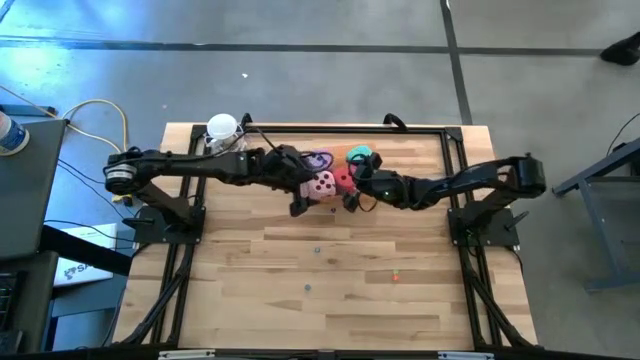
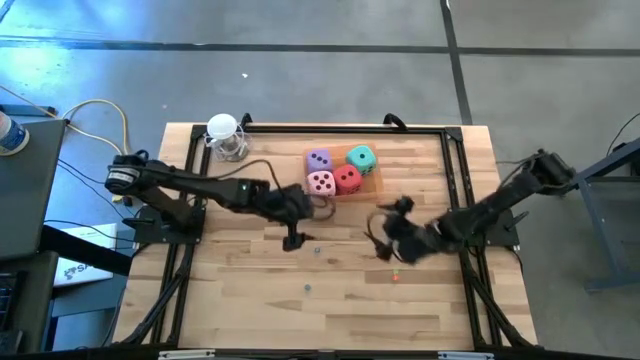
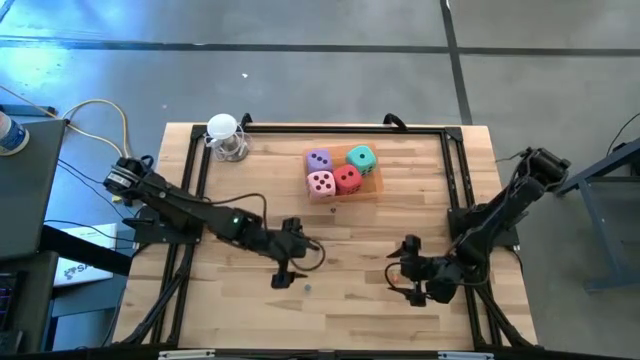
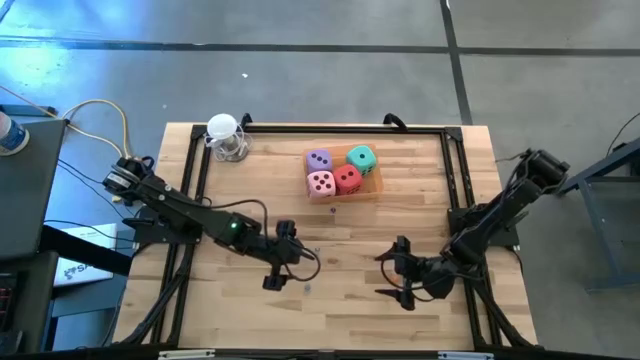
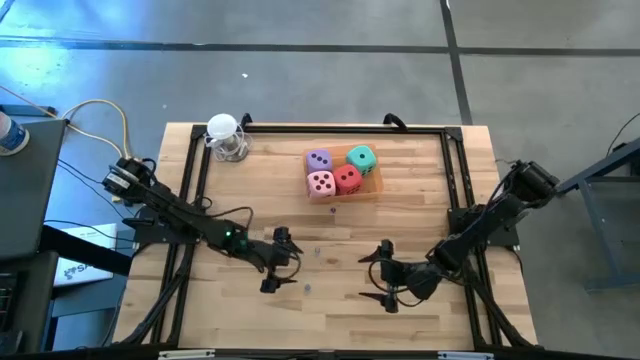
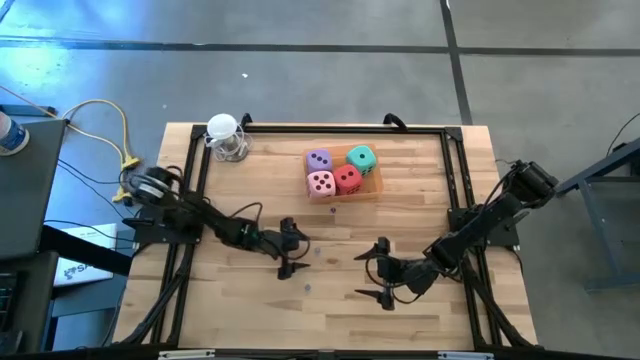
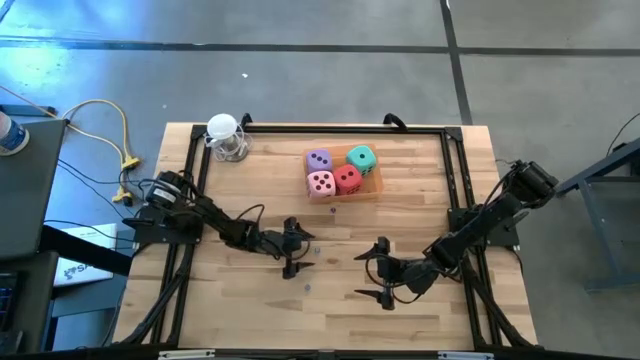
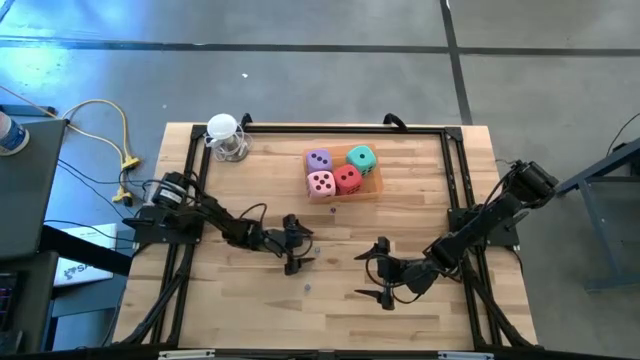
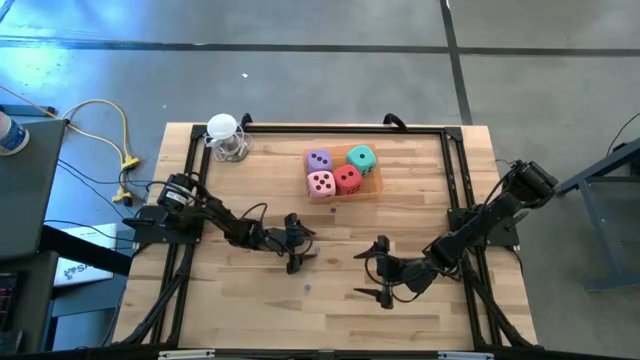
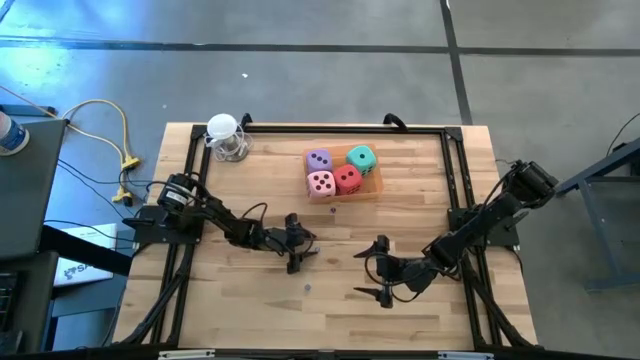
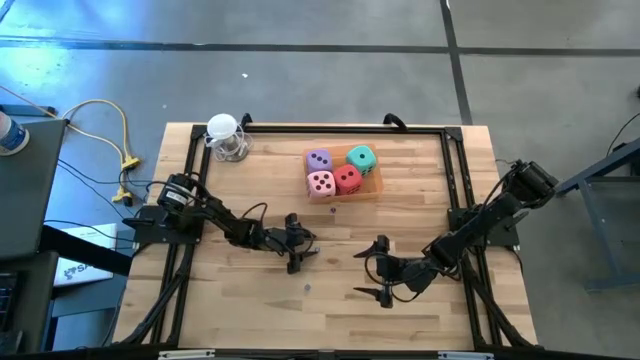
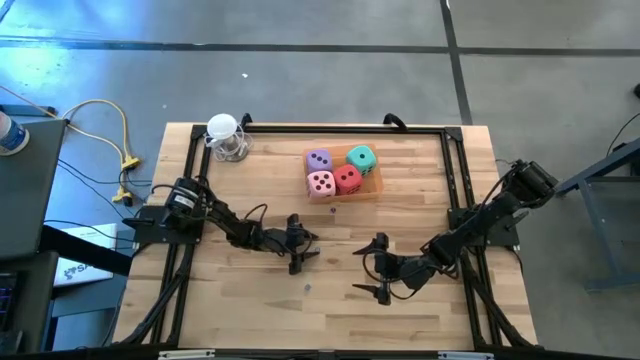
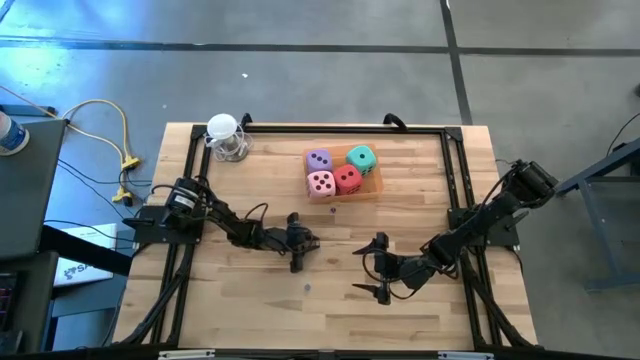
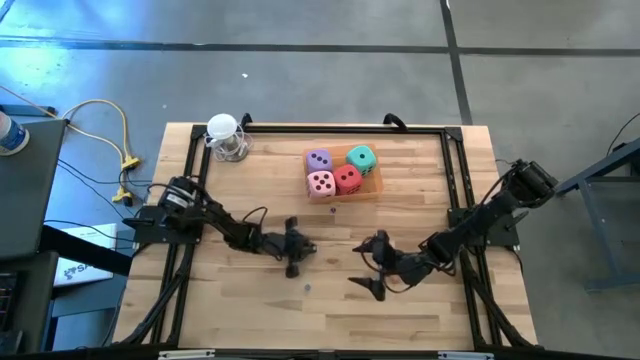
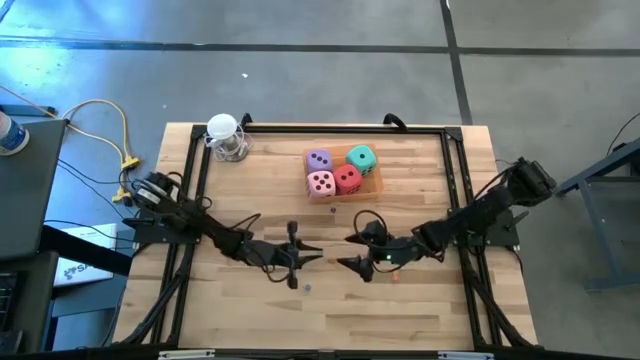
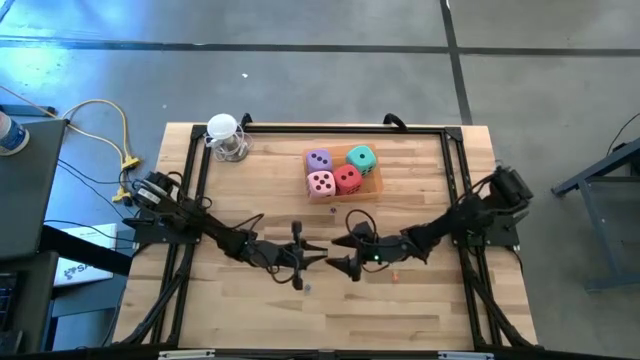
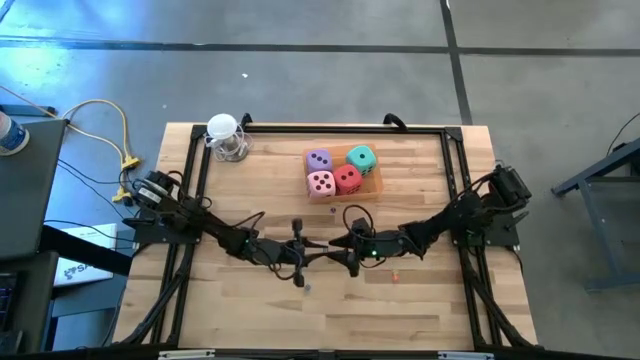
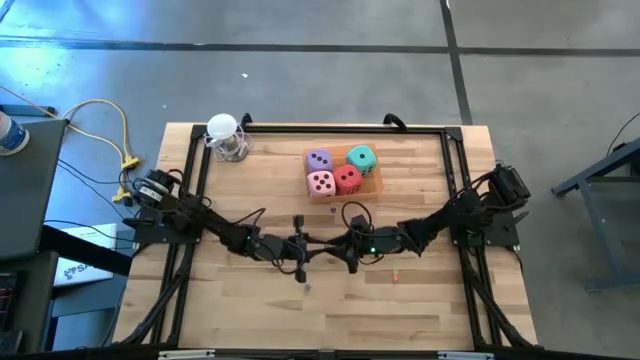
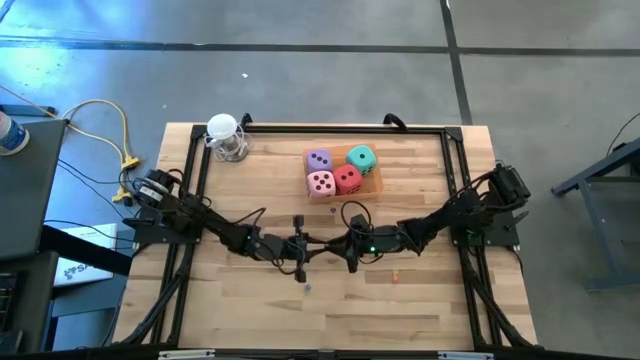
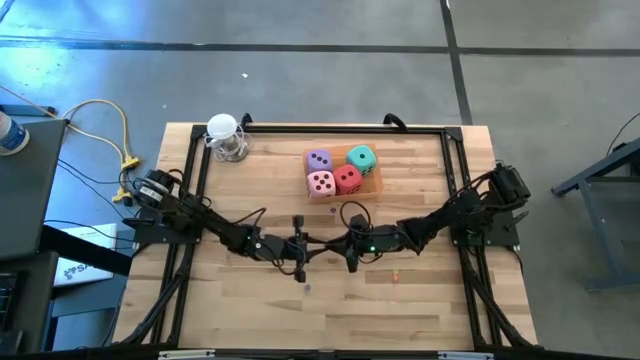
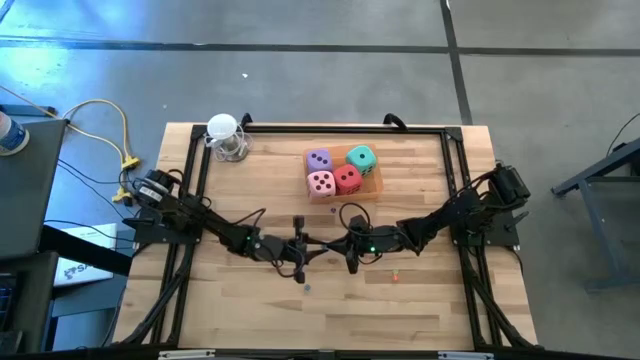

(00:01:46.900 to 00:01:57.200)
Task: Pick & Place Dice
Put the small light blue dice into the orange container

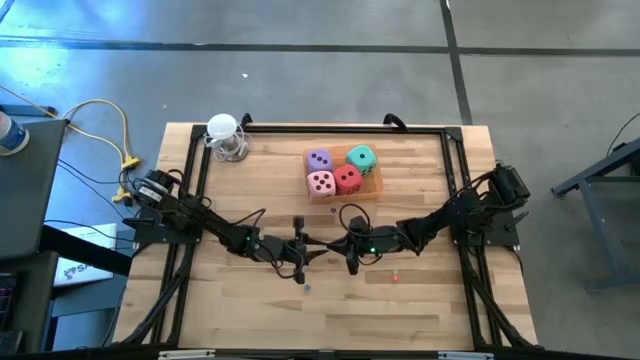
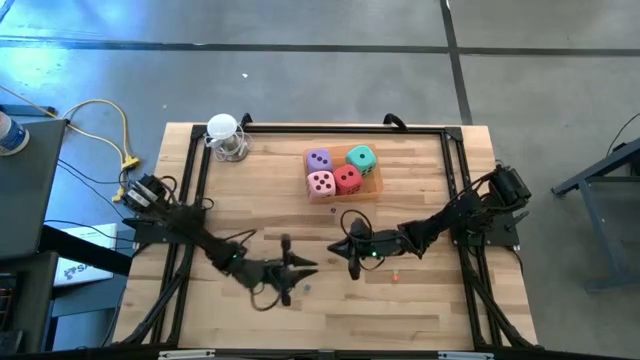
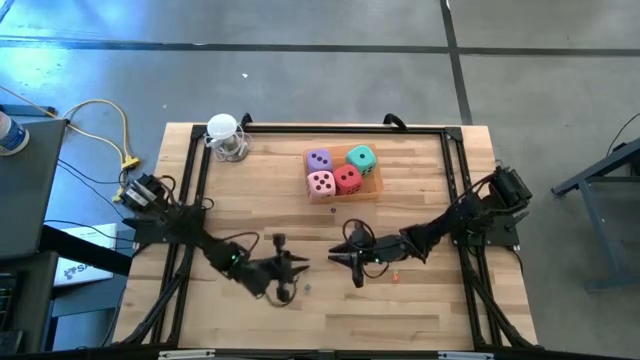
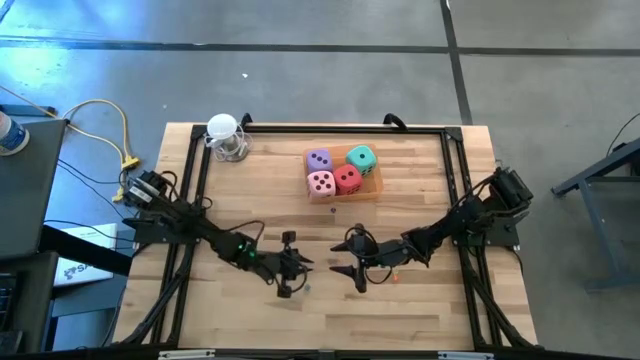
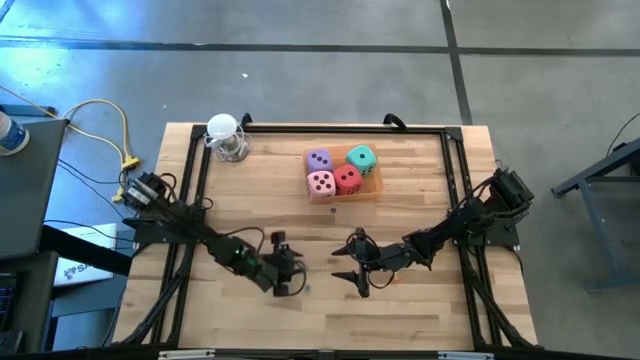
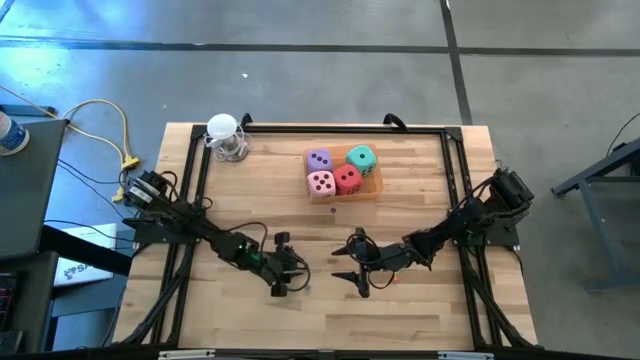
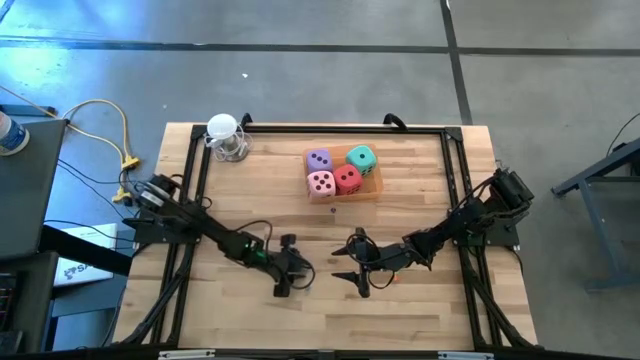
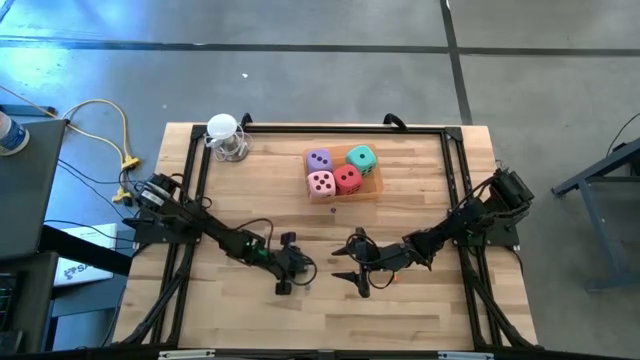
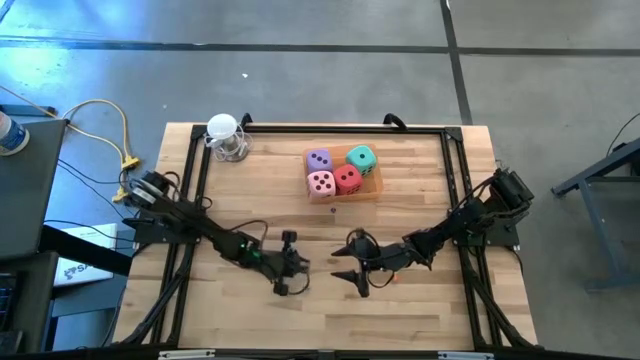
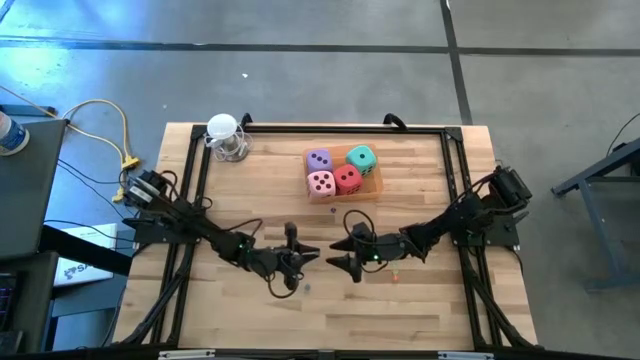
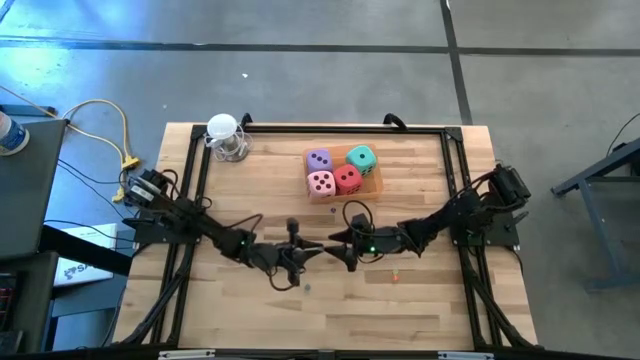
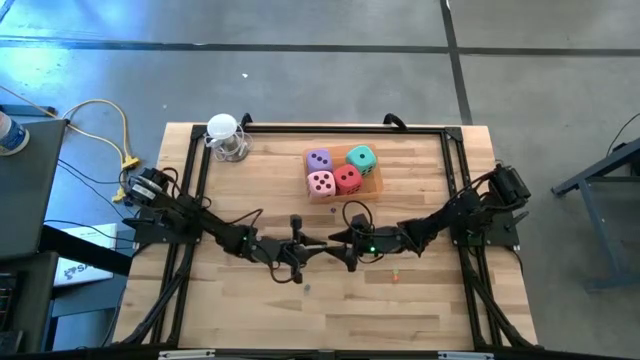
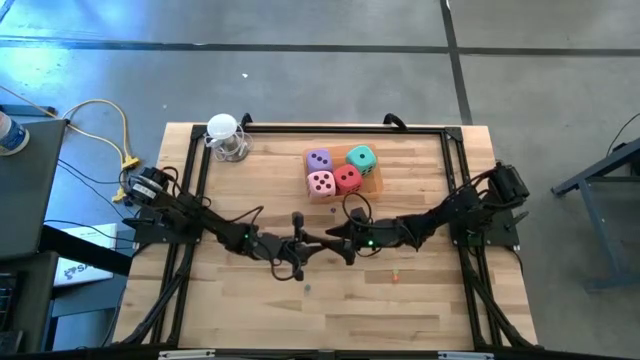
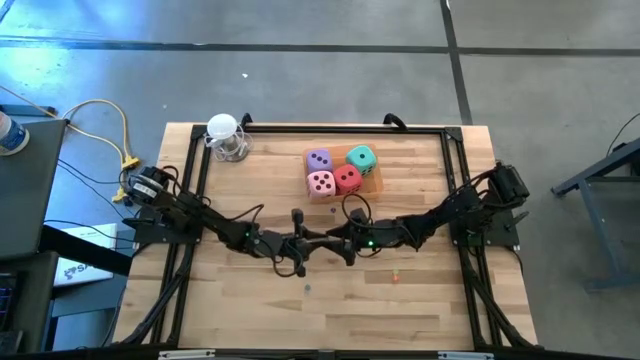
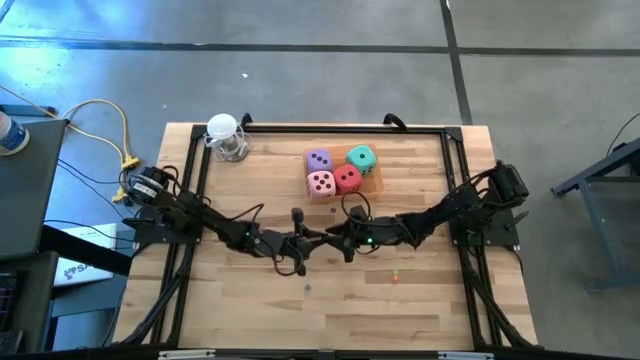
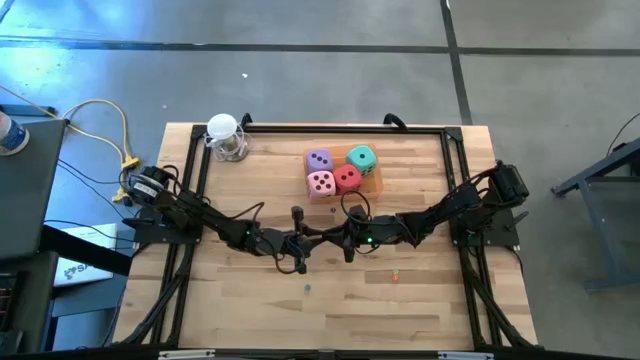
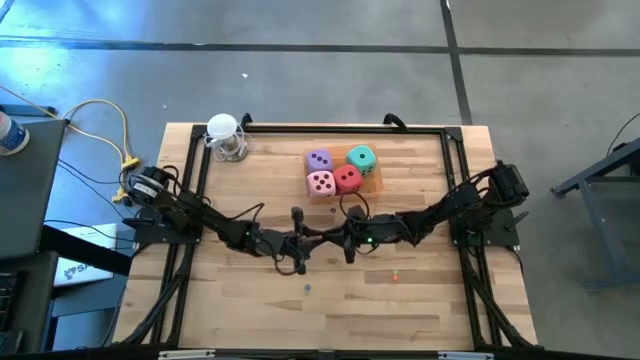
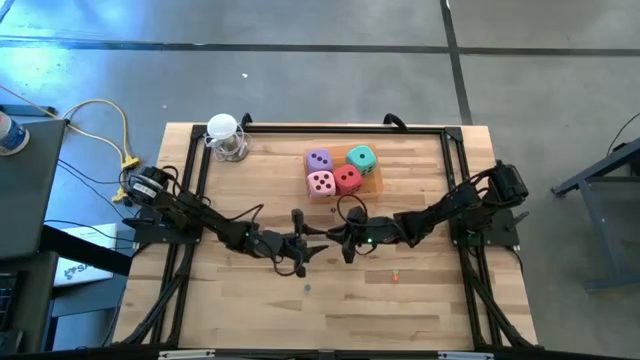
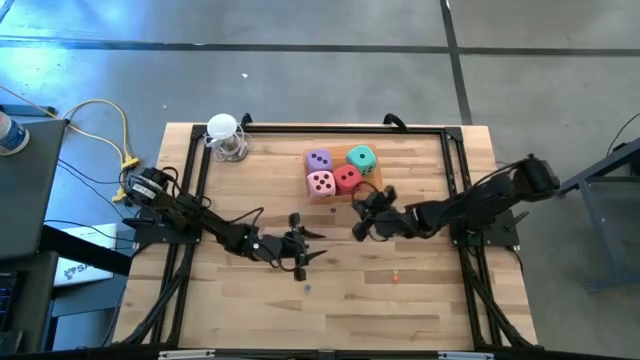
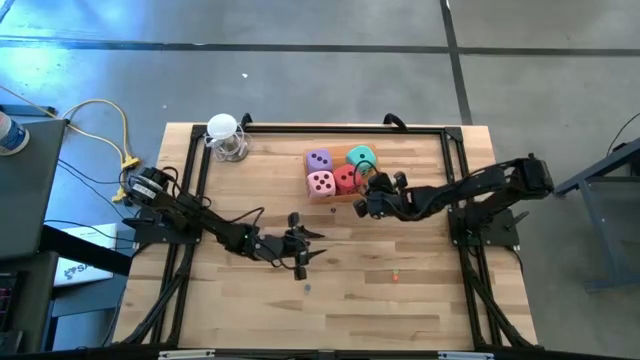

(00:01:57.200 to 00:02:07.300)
Put the small light blue dice into the orange container
